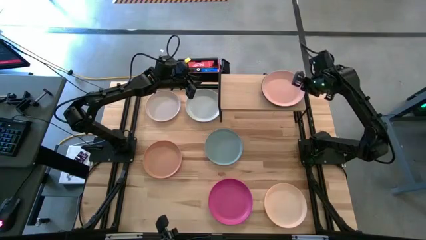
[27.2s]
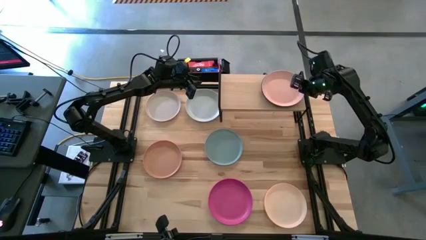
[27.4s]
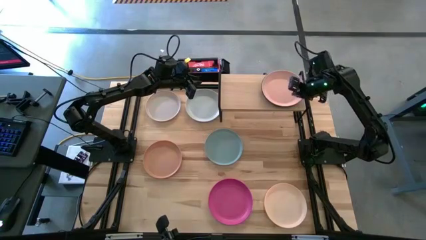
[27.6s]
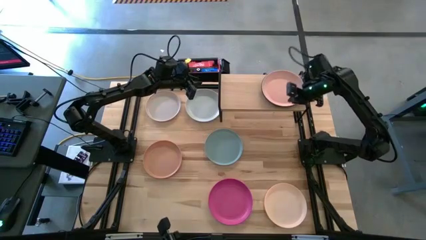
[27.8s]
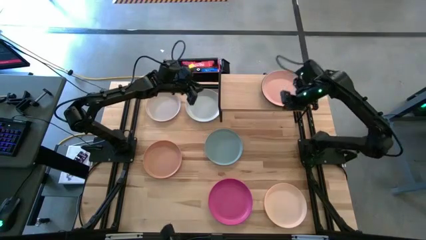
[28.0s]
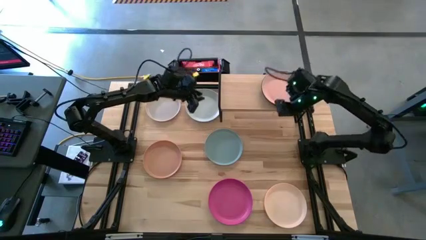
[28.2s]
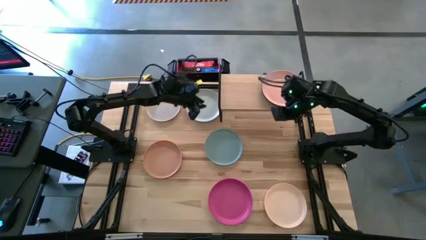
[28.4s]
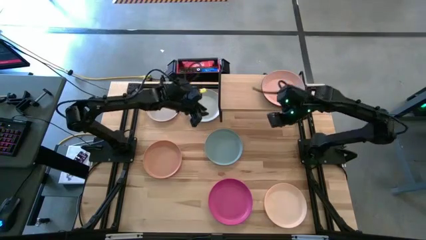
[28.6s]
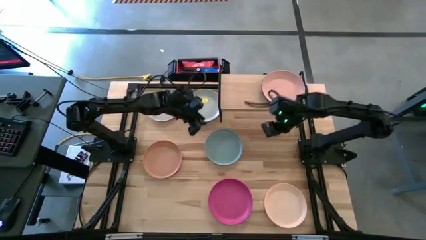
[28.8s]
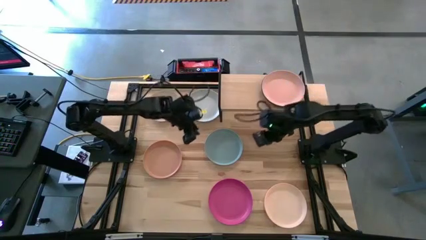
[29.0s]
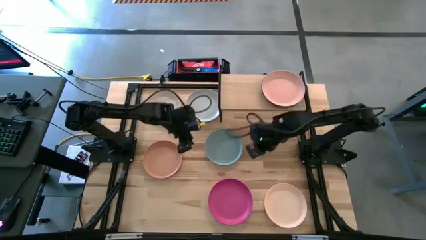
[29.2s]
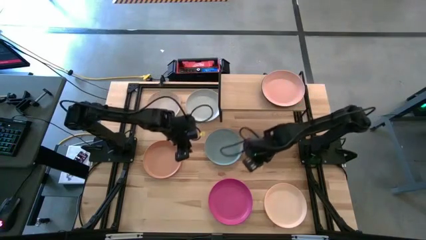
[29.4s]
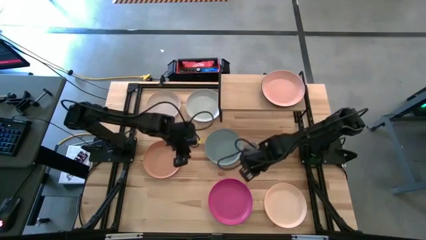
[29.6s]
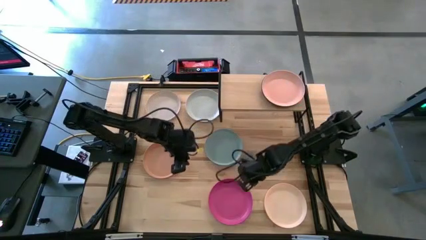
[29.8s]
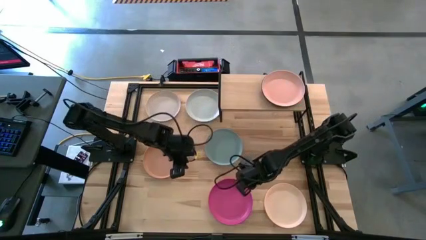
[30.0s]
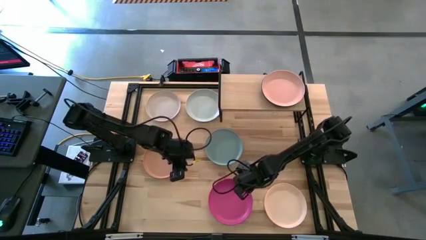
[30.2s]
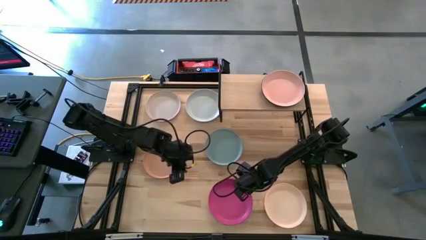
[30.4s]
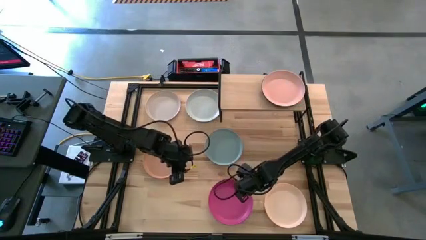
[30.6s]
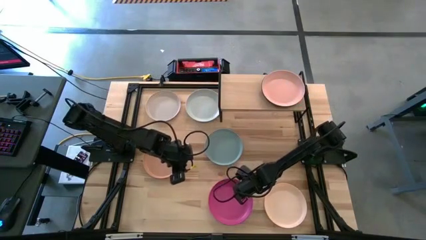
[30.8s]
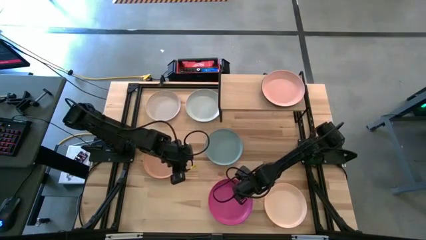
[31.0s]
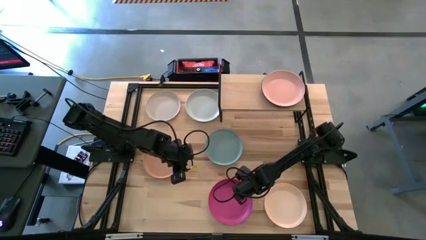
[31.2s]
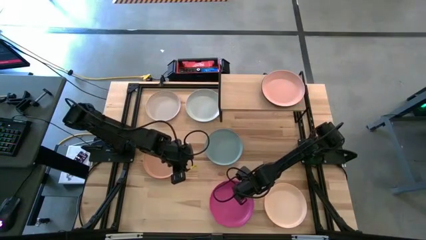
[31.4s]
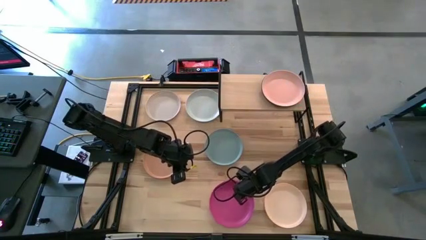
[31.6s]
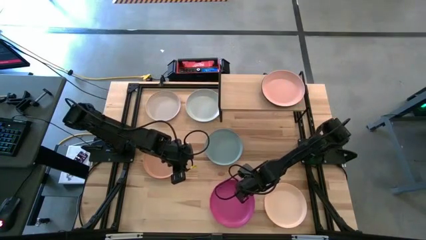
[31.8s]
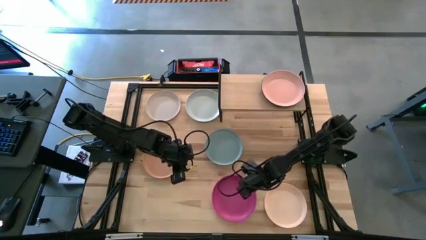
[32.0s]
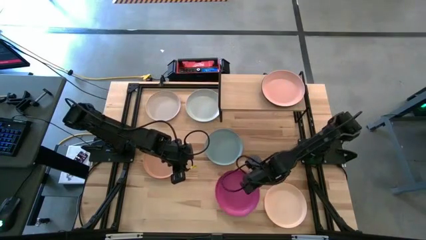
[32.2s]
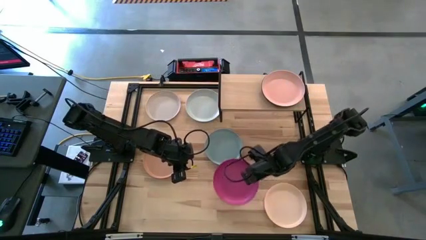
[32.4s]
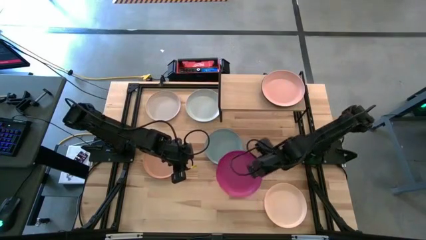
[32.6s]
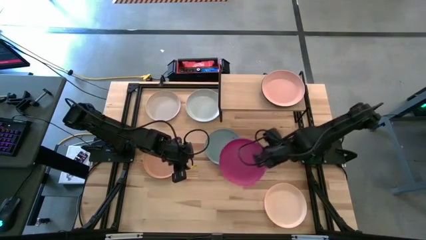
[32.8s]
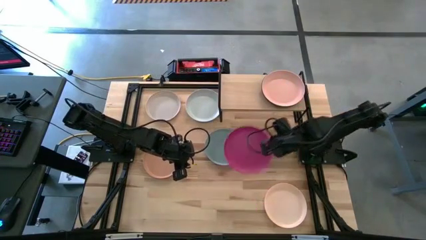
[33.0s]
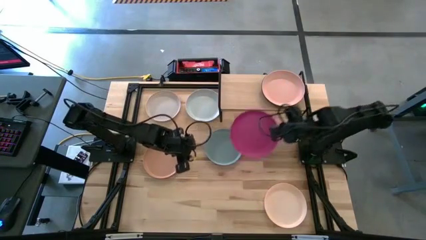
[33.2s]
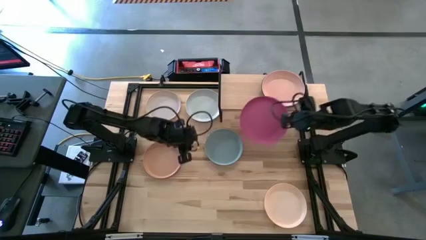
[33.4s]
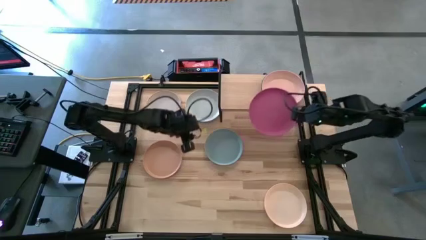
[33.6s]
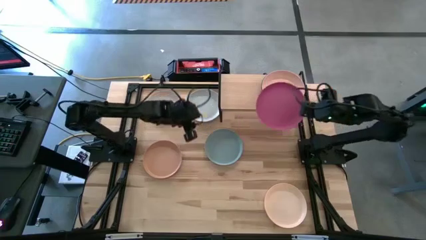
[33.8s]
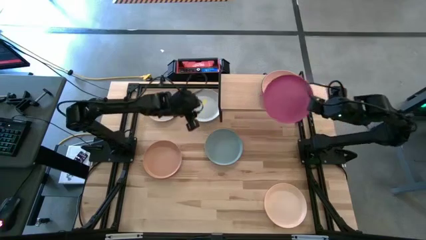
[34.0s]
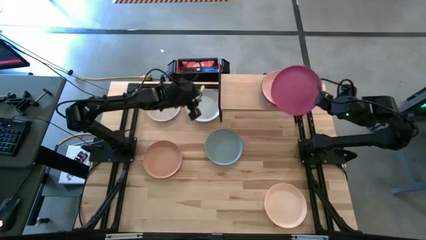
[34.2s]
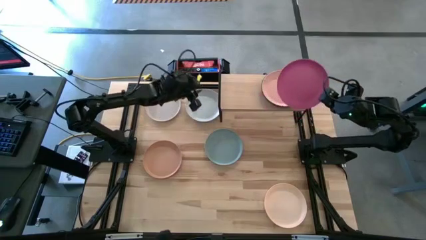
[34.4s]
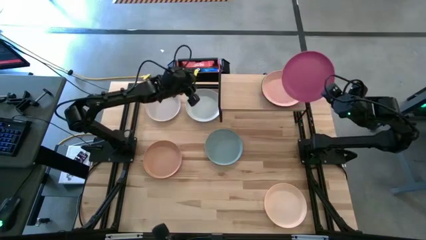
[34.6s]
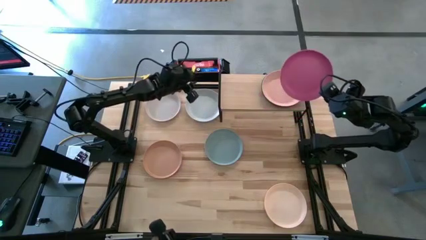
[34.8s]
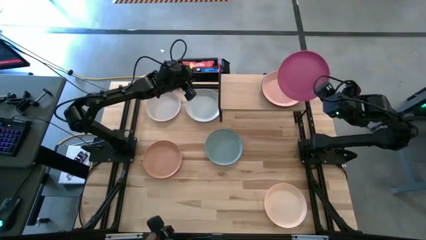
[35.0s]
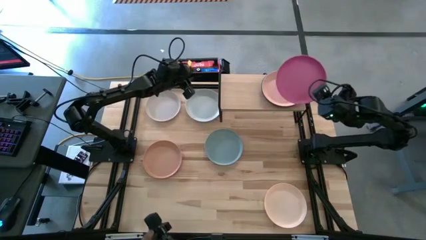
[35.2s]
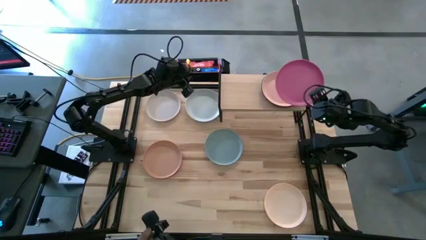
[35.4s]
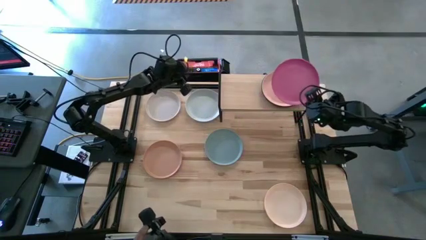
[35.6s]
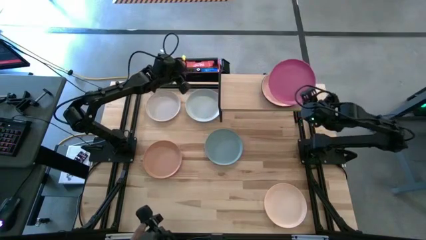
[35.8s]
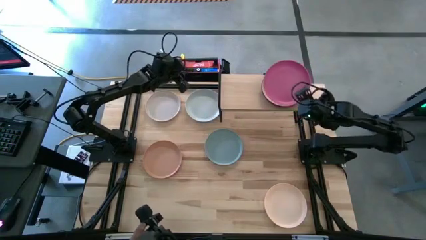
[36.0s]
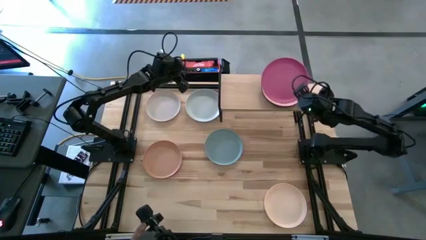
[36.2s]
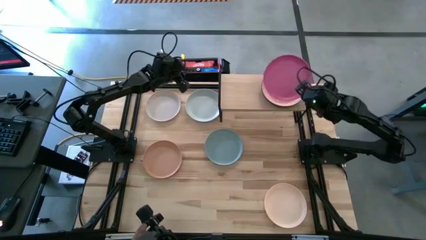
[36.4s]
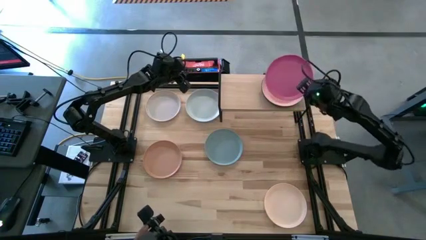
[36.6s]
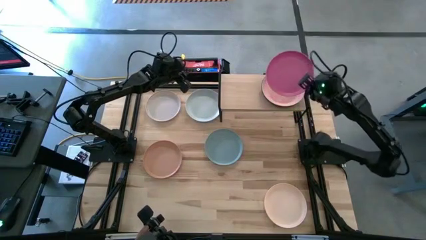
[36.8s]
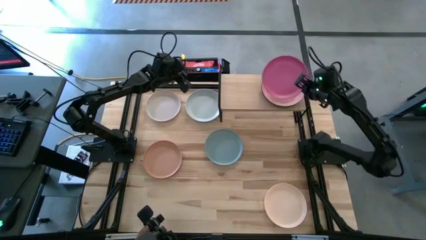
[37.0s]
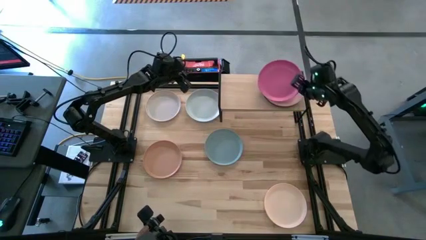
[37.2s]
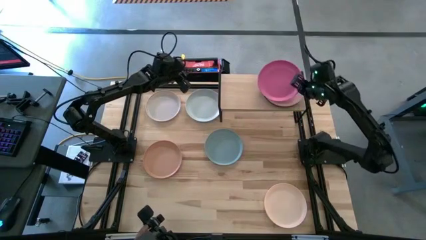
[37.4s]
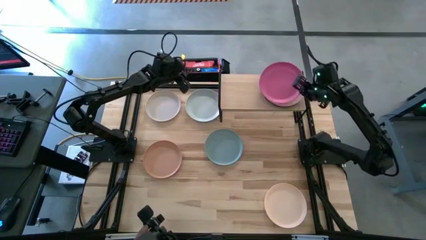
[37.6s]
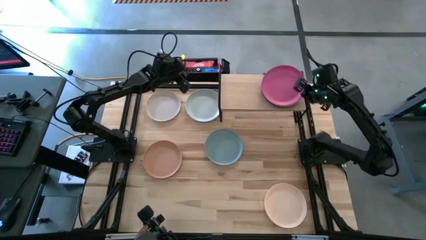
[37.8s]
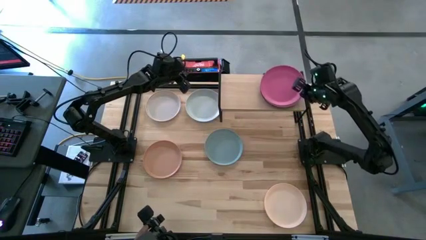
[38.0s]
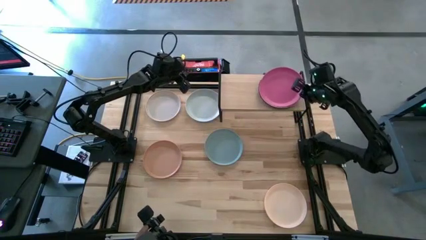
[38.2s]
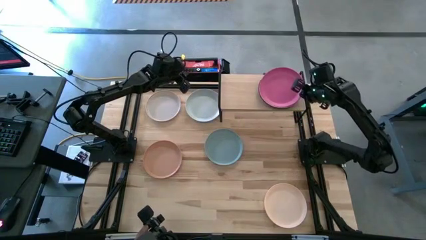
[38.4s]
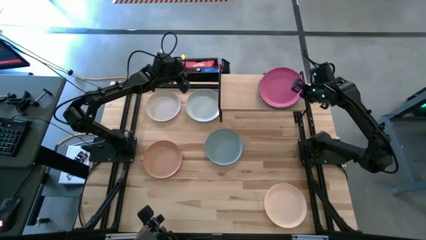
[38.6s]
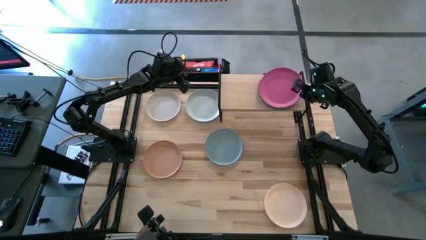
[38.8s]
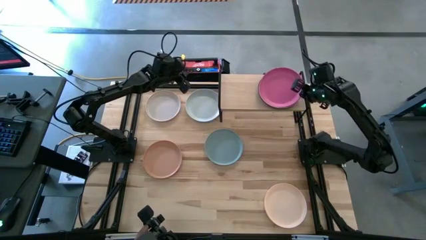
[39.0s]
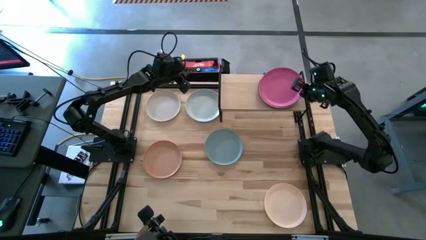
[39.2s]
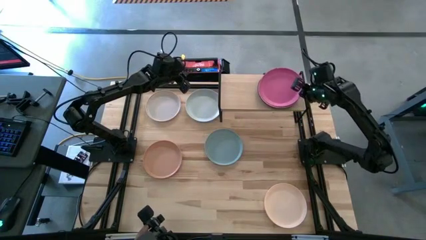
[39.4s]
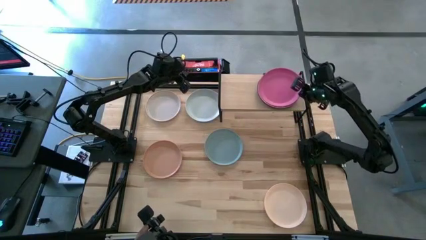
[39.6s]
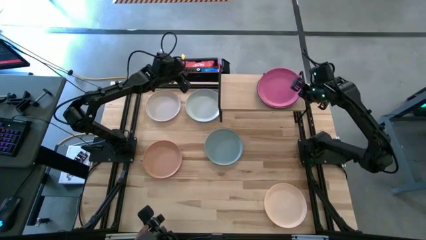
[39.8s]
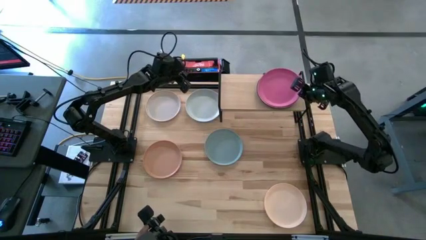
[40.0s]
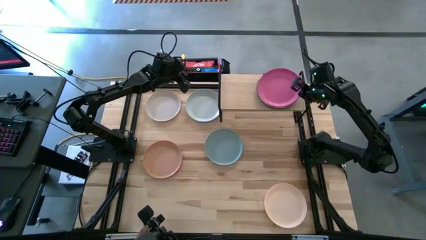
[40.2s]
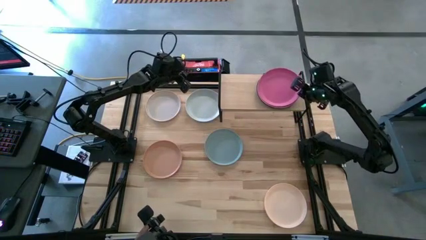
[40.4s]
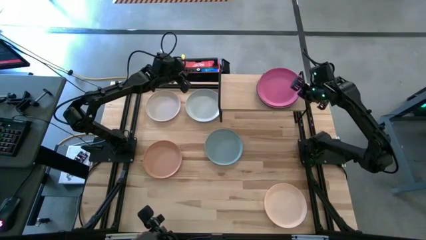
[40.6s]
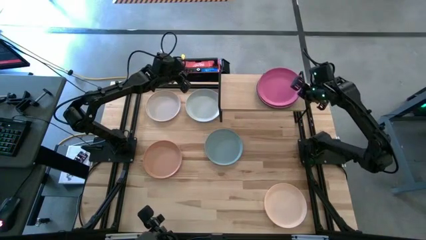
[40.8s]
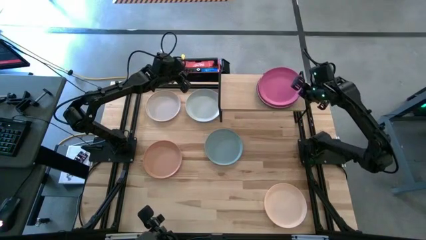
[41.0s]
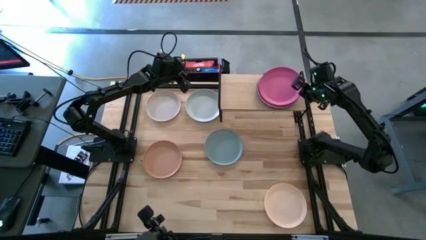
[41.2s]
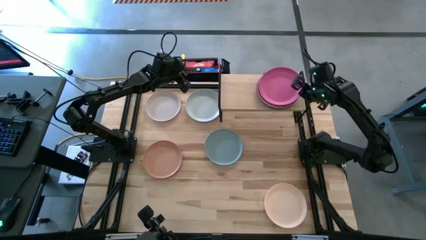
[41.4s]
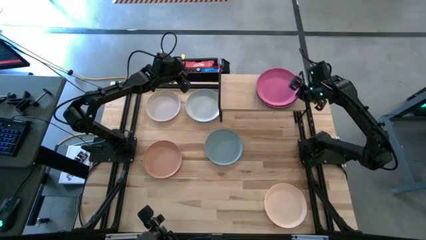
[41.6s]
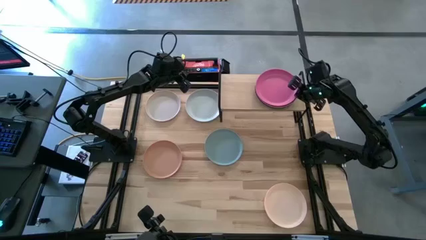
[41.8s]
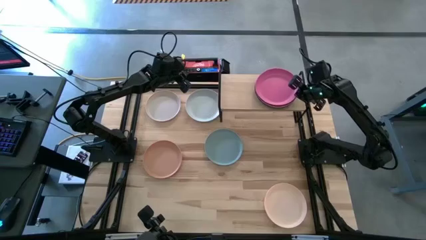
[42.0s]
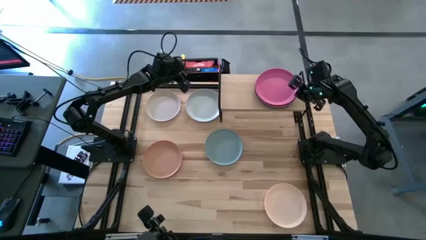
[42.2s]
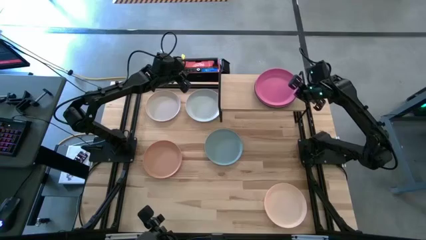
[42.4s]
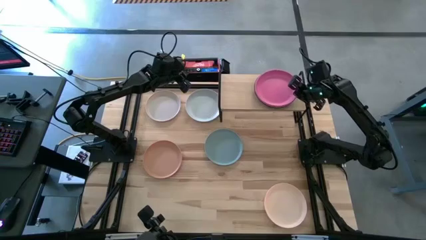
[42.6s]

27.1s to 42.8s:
Task: Place and stack plates onto a shelf
Stack the pink plate on top of the light brown plate on the shelf
